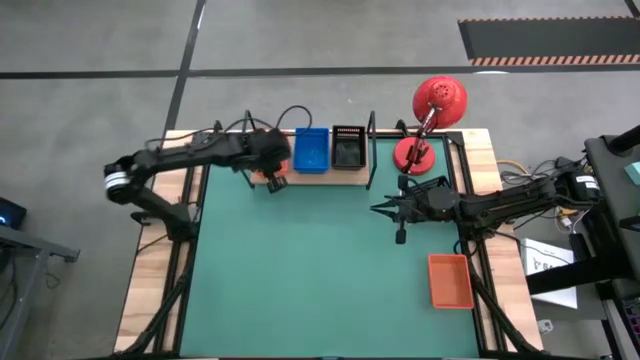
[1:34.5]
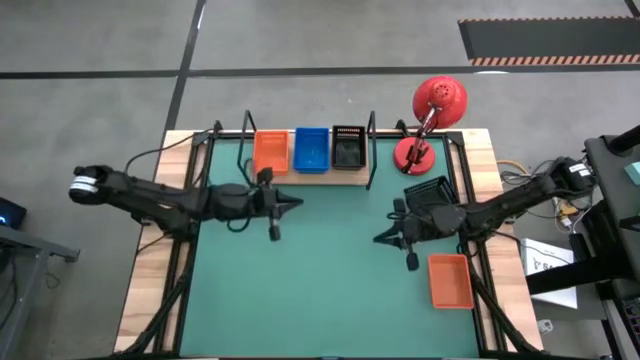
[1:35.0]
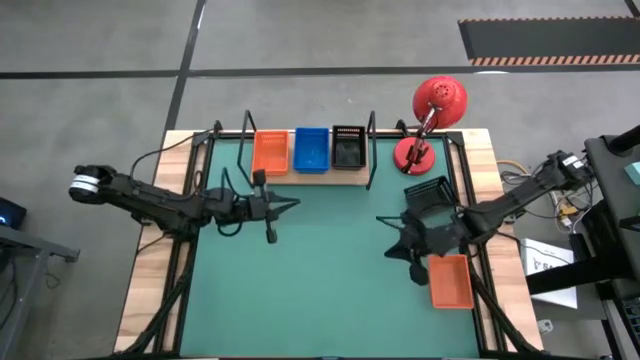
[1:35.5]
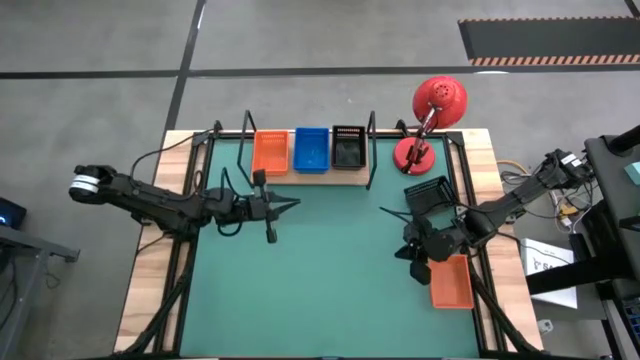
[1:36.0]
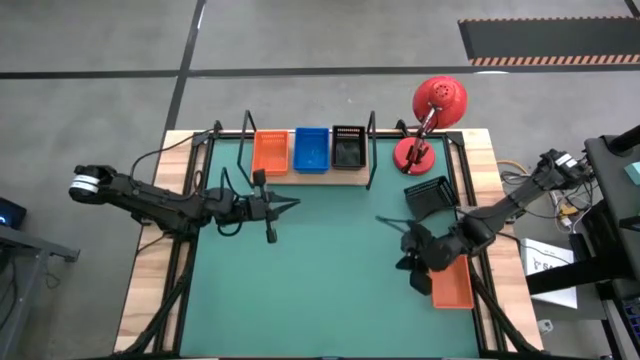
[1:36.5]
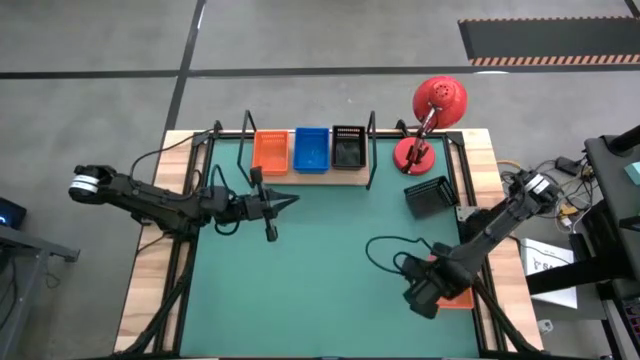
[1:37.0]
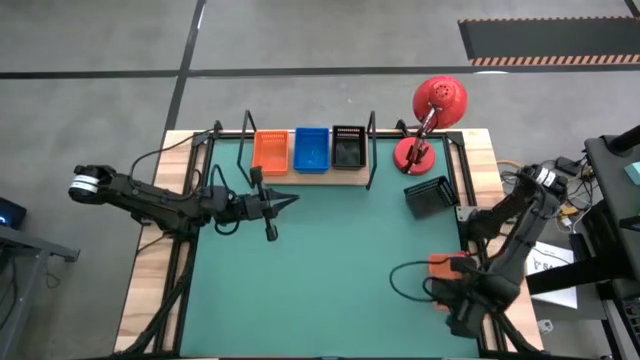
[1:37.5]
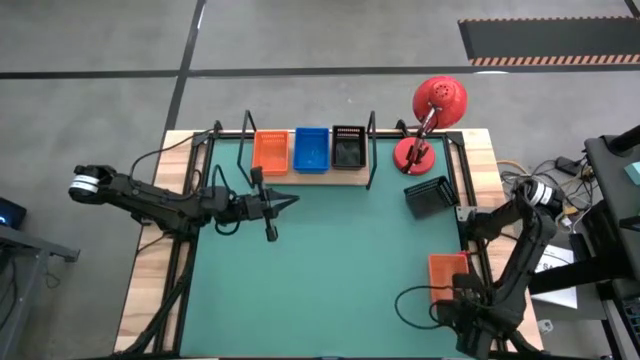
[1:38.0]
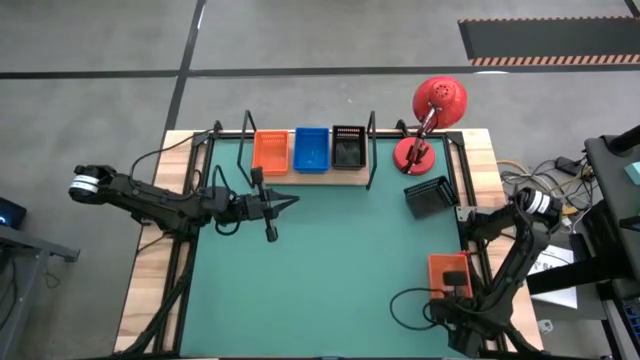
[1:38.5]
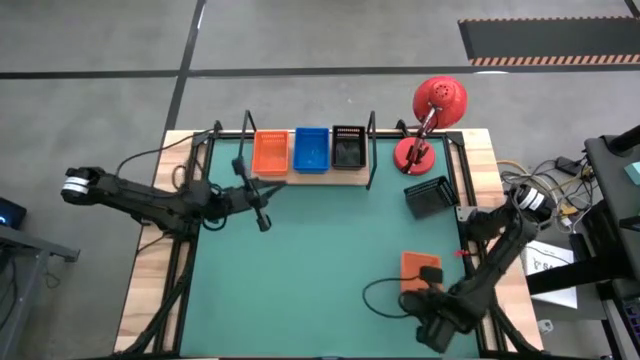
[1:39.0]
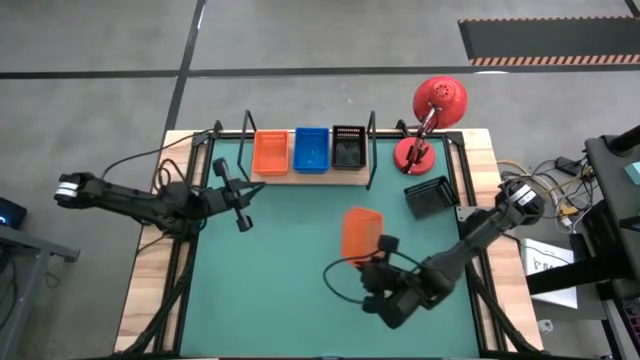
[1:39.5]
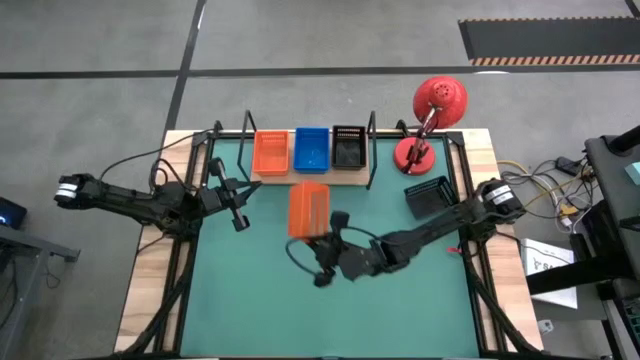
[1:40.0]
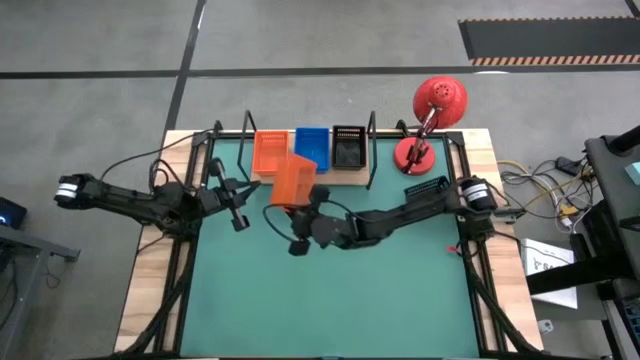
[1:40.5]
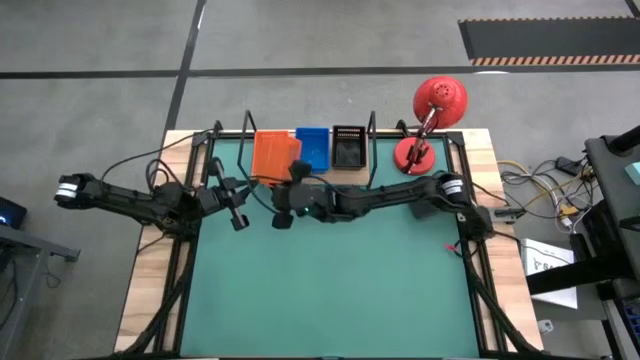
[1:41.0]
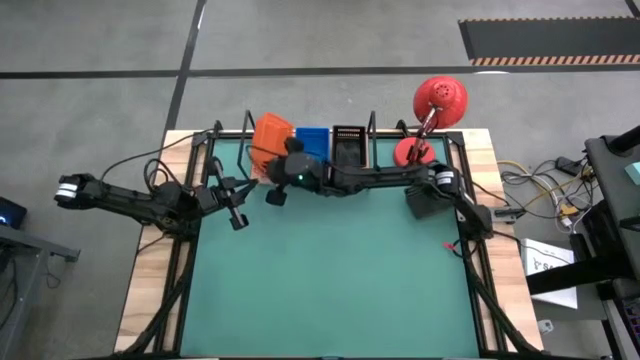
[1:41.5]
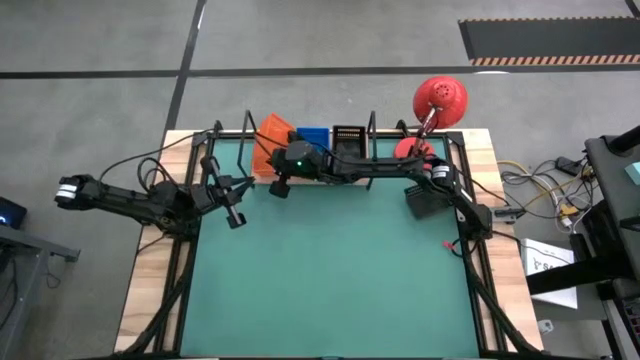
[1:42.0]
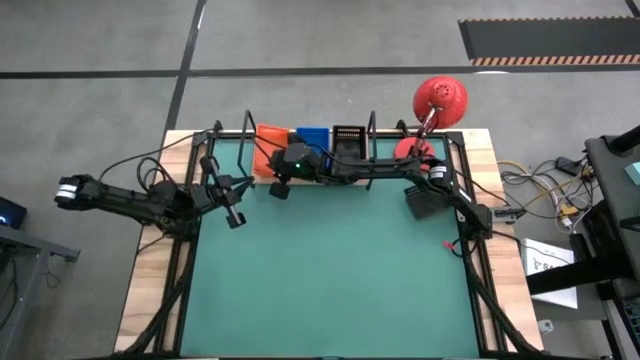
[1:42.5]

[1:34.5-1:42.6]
Task: Stack baskets on shelf by color
Stack the orange basket on top of the orange baskets on the shelf

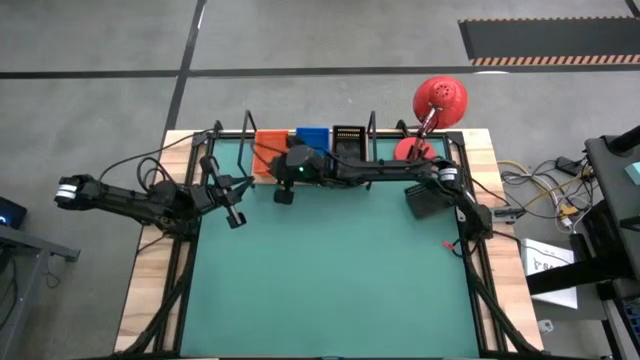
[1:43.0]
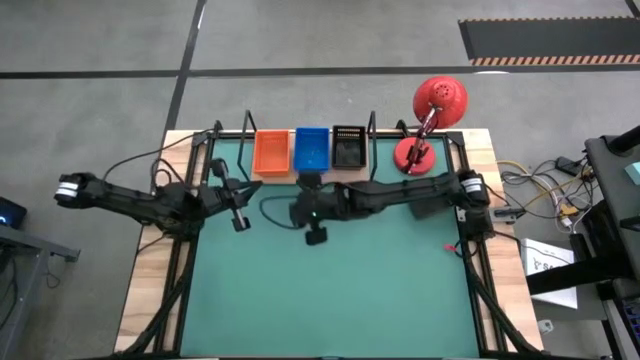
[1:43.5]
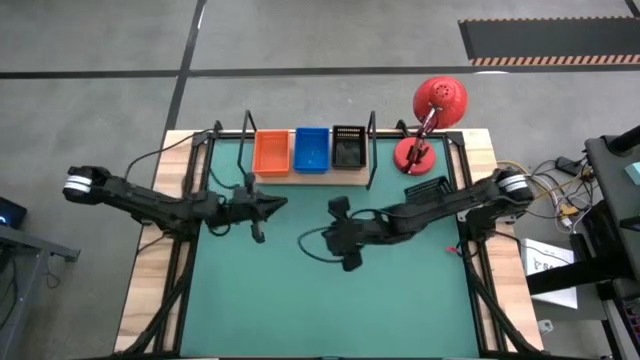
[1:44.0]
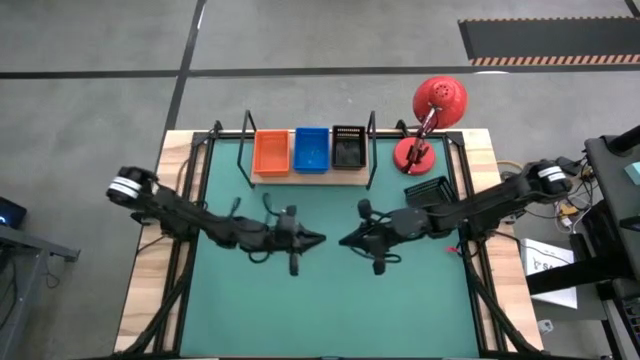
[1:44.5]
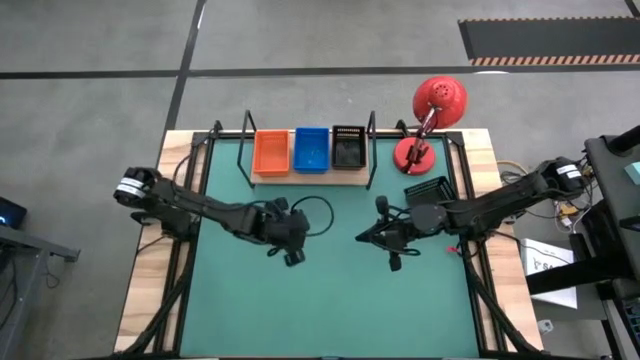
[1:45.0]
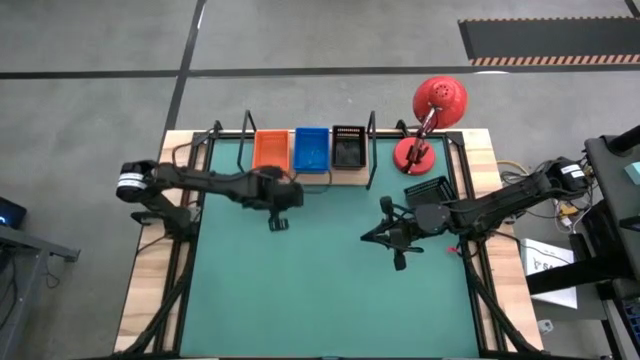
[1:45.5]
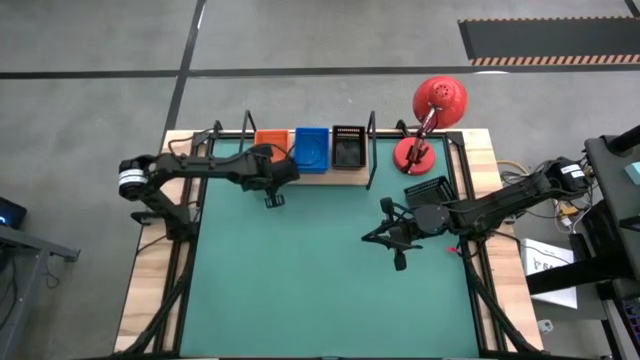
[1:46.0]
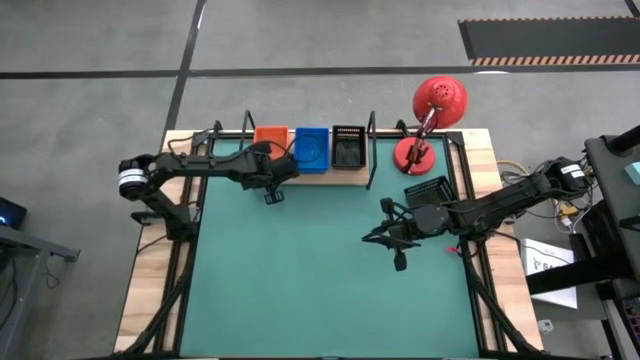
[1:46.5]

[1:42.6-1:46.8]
Adjust the orange baskets on the shelf

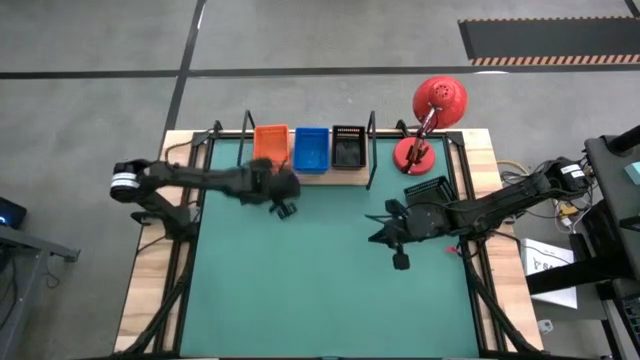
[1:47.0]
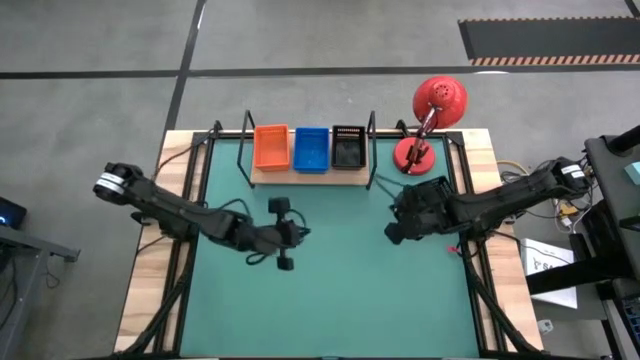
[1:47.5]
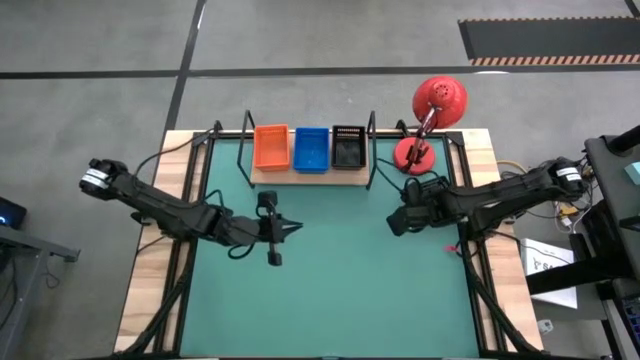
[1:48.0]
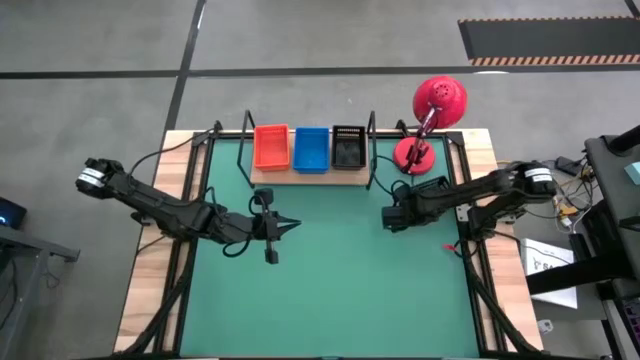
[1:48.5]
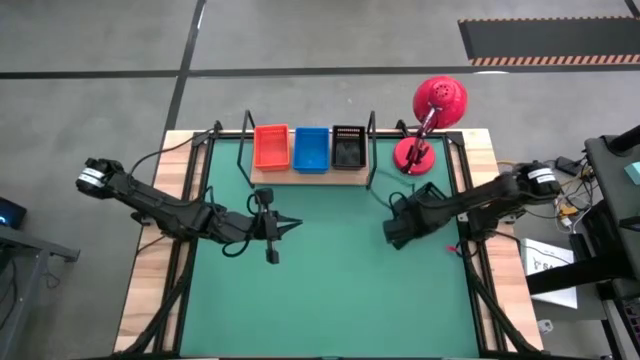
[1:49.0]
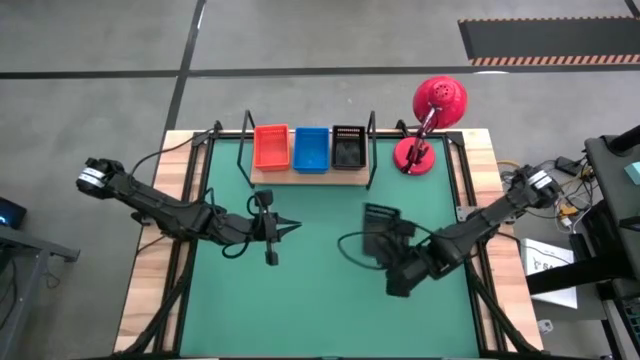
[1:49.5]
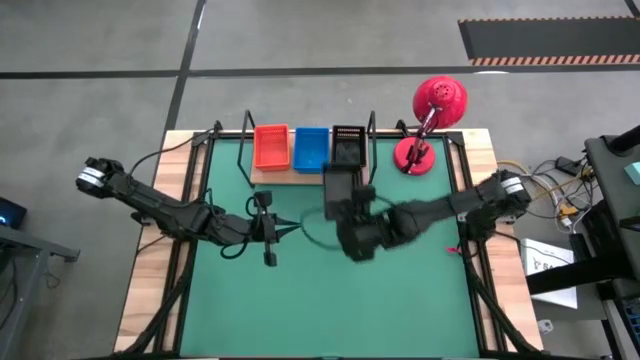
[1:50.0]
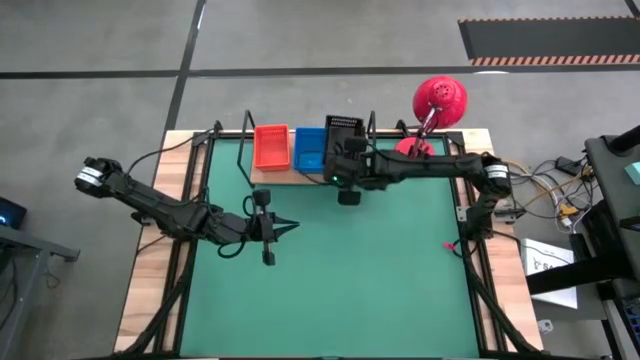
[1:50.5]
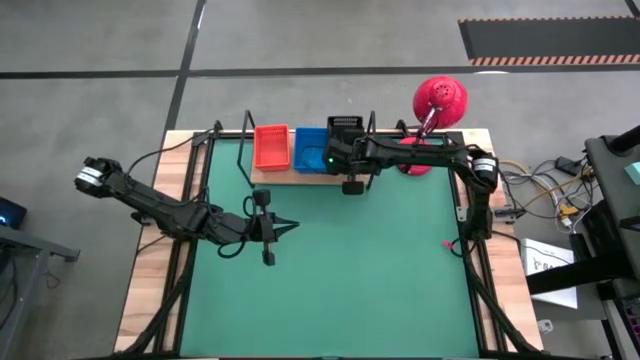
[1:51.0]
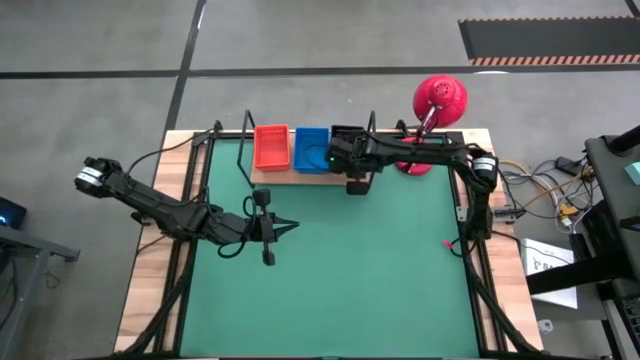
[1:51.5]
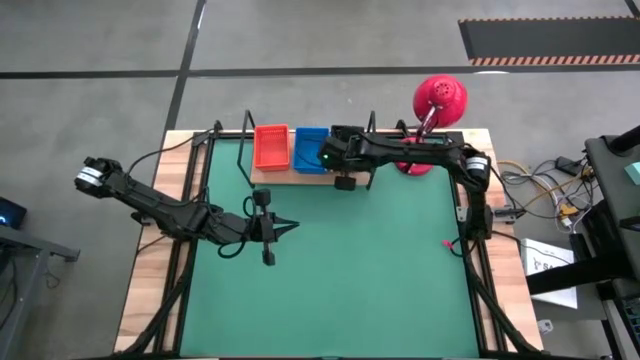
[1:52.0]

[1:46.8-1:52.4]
Stack the black basket on top of the black baskets on the shelf

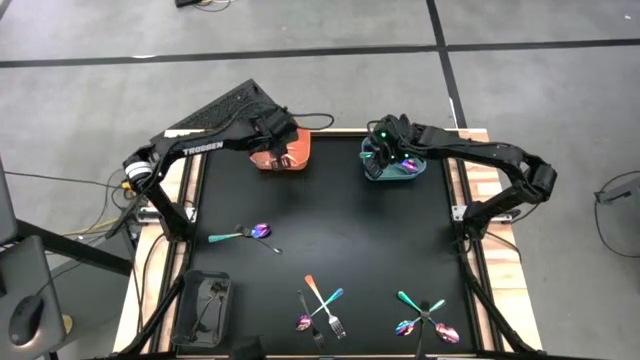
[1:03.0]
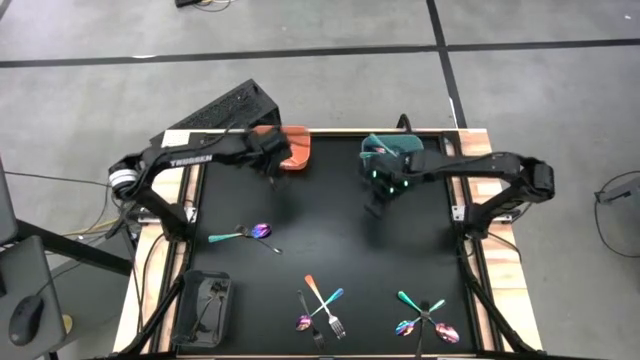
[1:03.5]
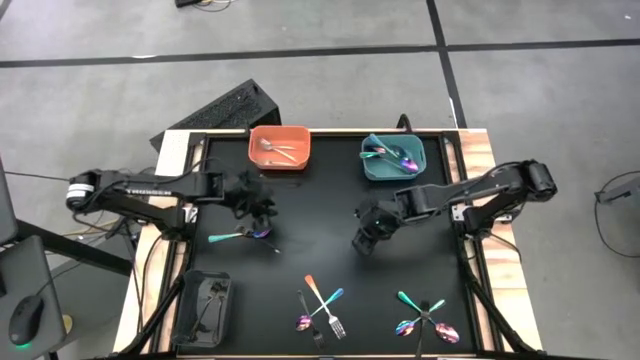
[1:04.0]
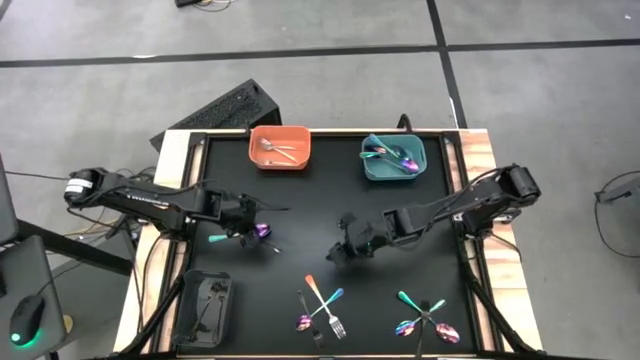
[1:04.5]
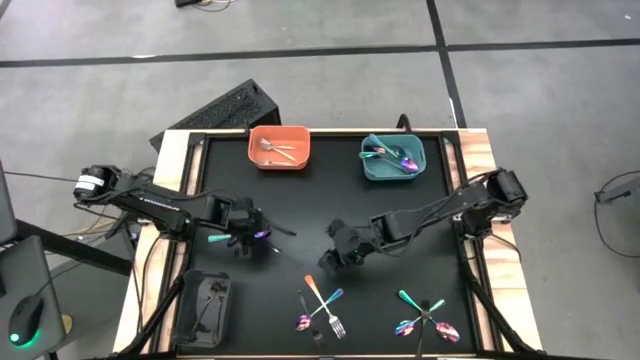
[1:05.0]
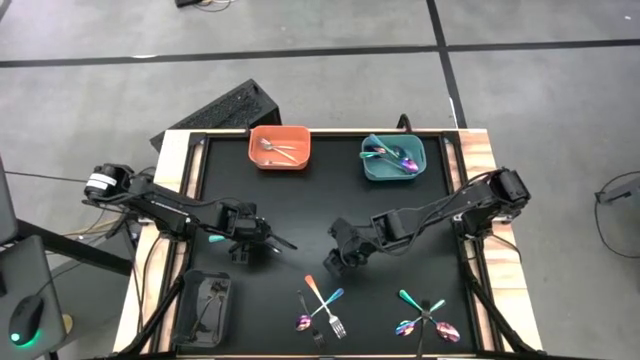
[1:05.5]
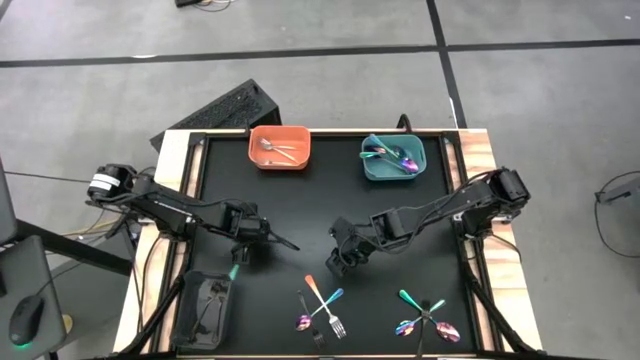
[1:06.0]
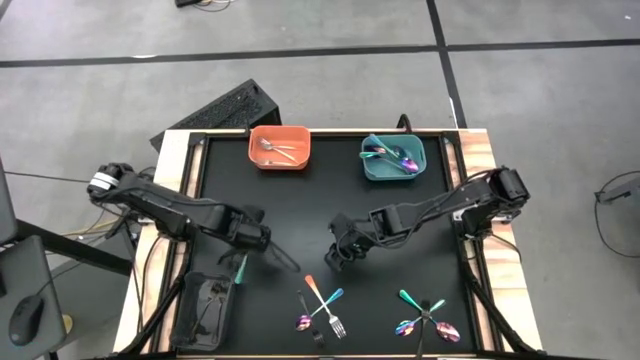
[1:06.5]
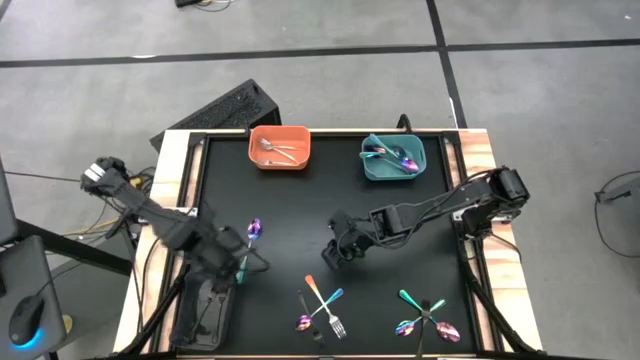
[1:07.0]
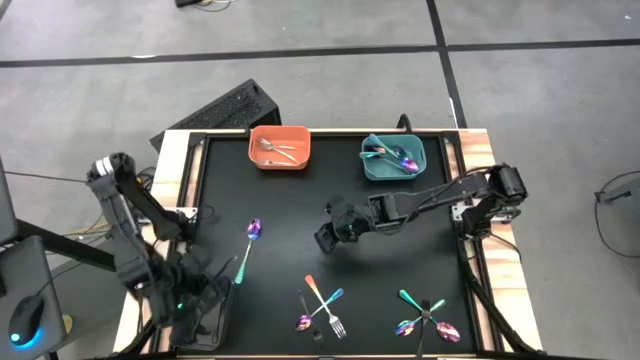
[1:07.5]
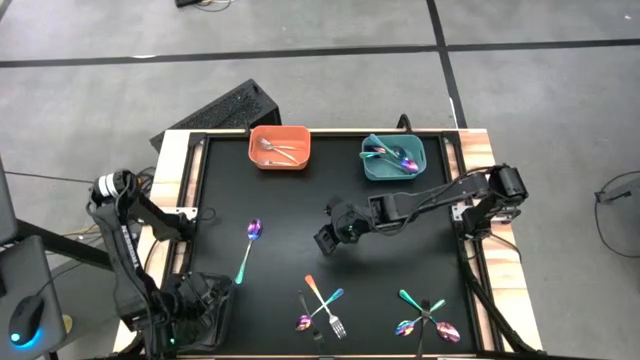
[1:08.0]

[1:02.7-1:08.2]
Task: Sort silverware by color (type)
Put the black fork into the black bin
